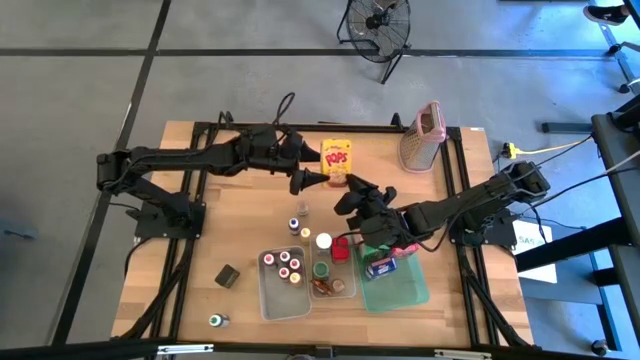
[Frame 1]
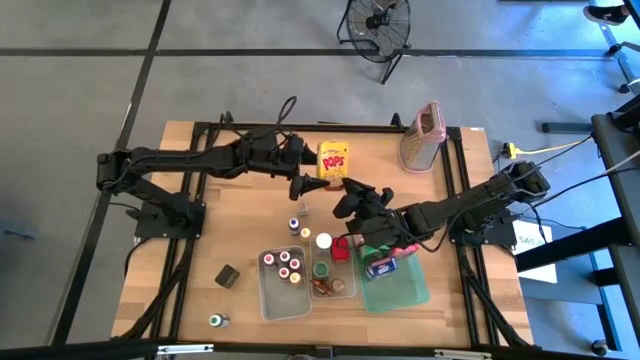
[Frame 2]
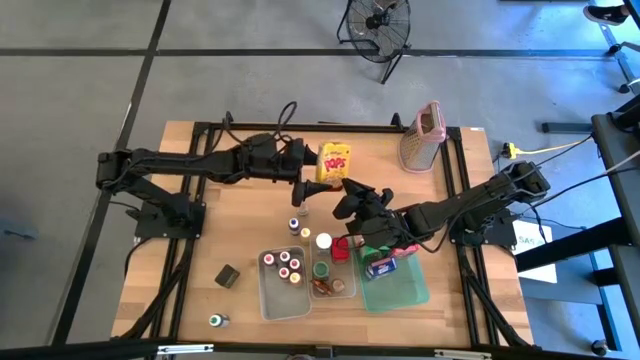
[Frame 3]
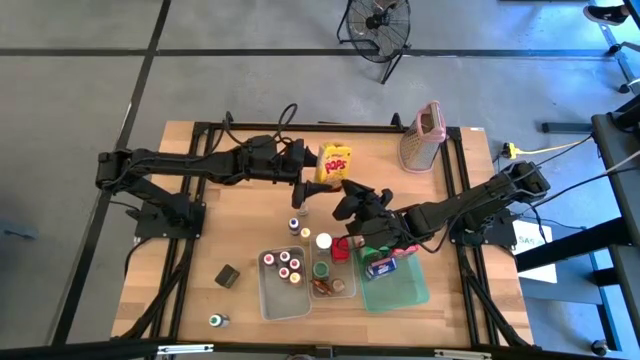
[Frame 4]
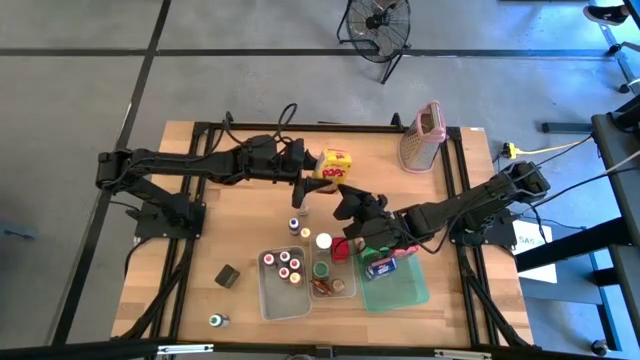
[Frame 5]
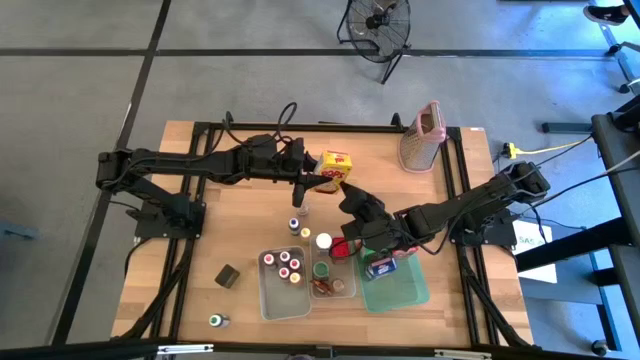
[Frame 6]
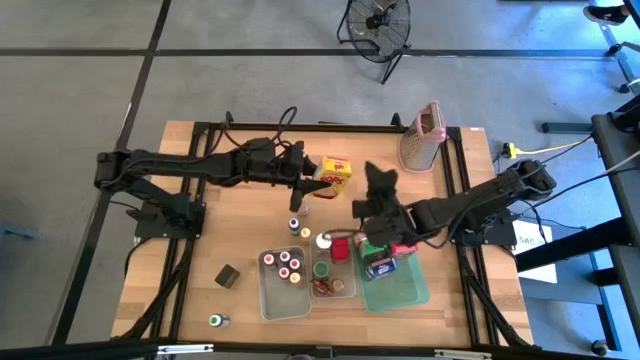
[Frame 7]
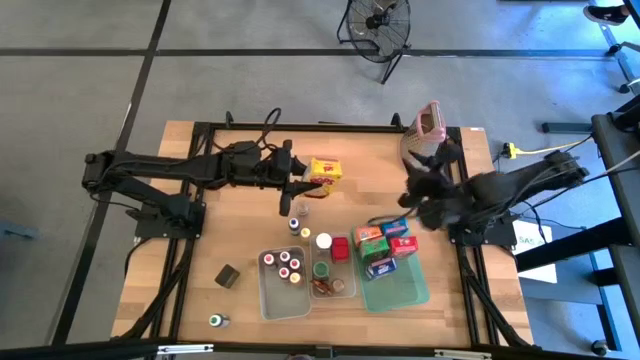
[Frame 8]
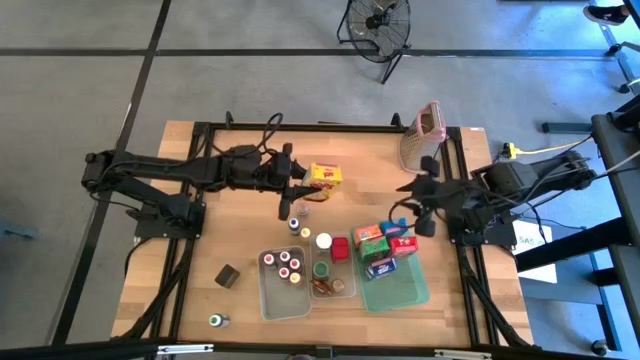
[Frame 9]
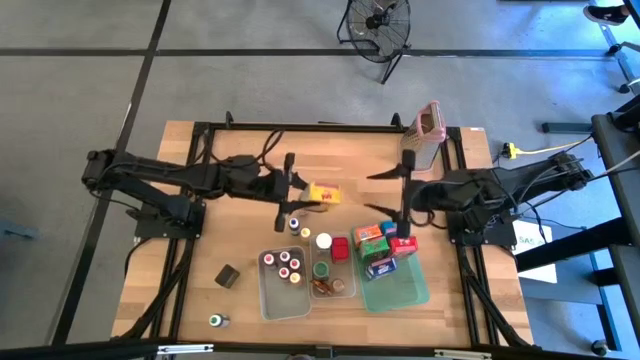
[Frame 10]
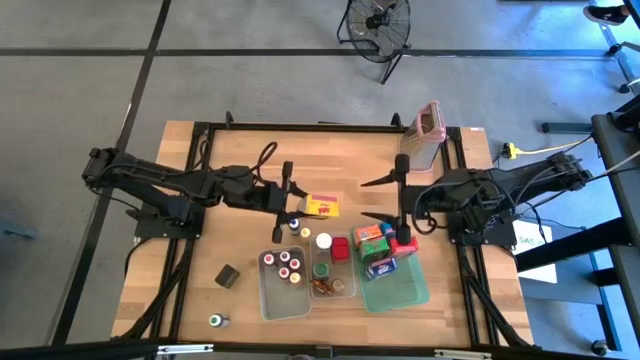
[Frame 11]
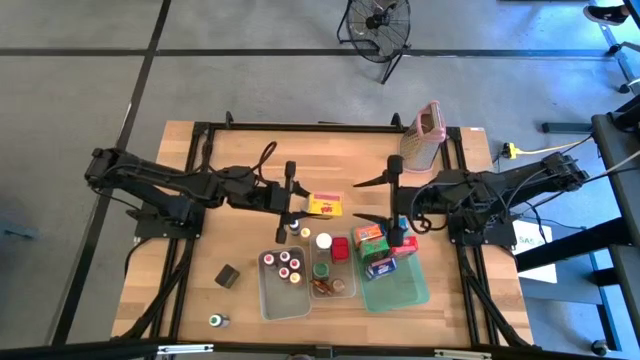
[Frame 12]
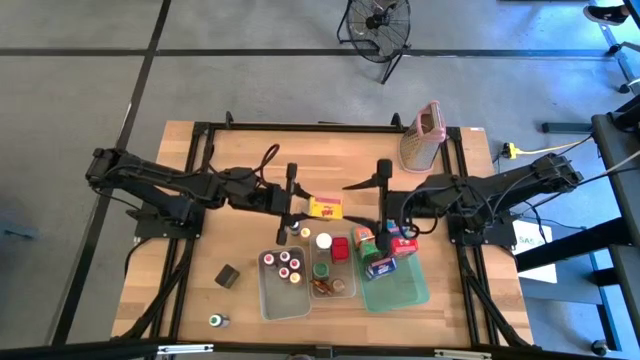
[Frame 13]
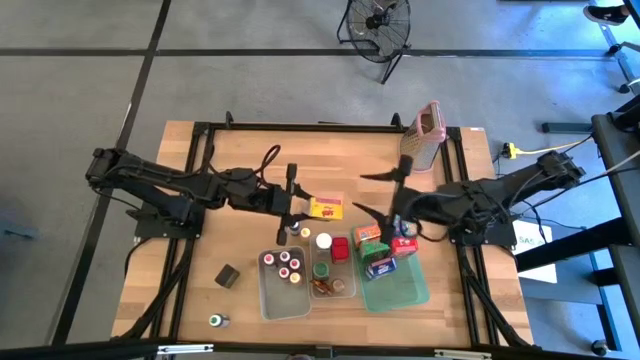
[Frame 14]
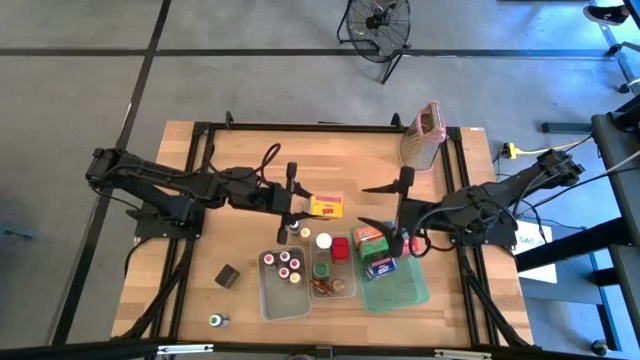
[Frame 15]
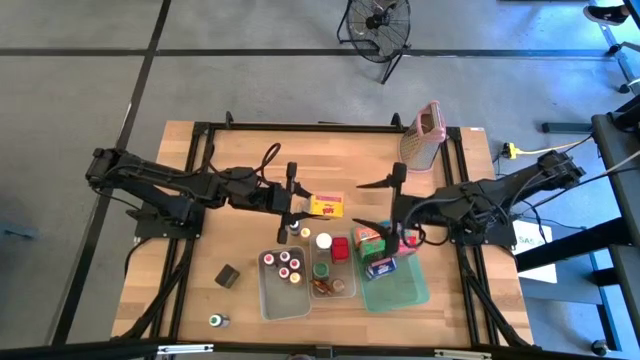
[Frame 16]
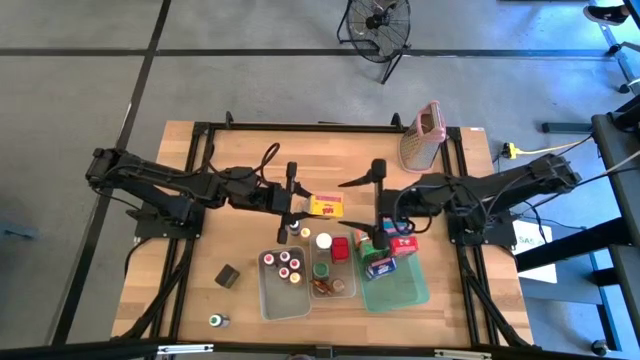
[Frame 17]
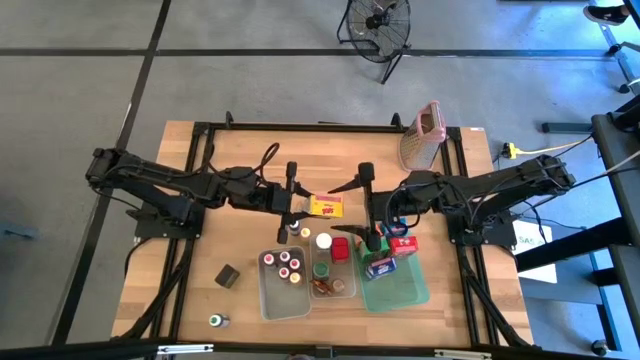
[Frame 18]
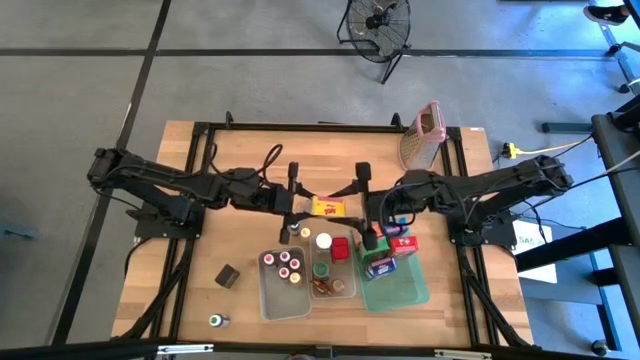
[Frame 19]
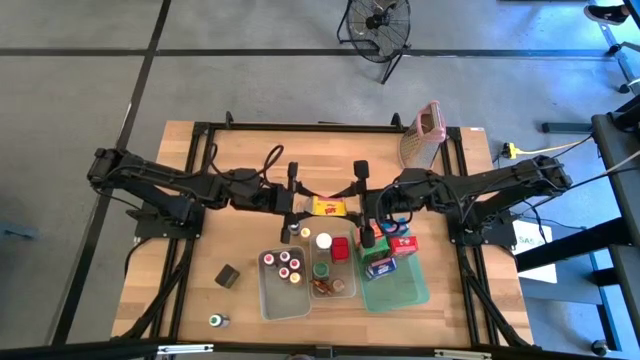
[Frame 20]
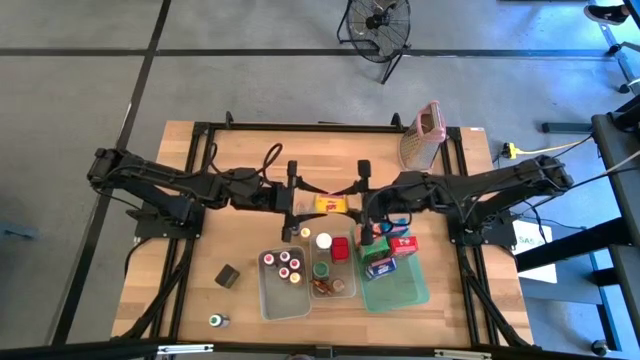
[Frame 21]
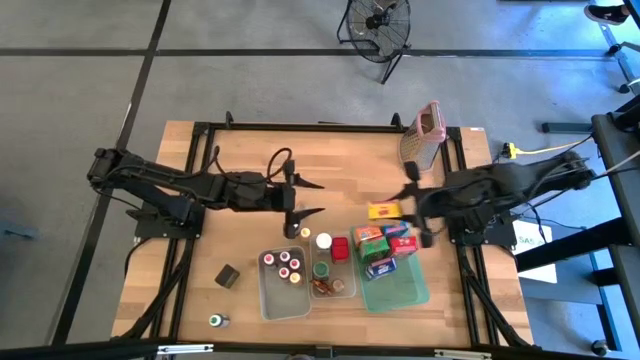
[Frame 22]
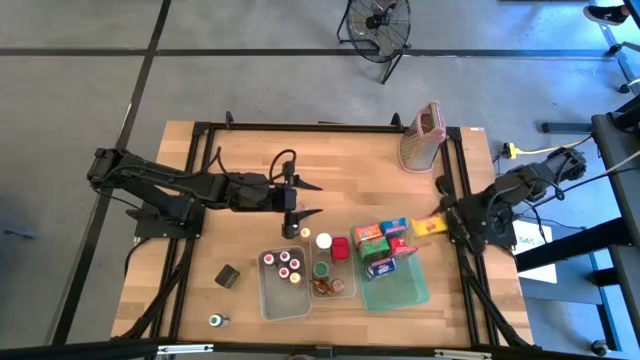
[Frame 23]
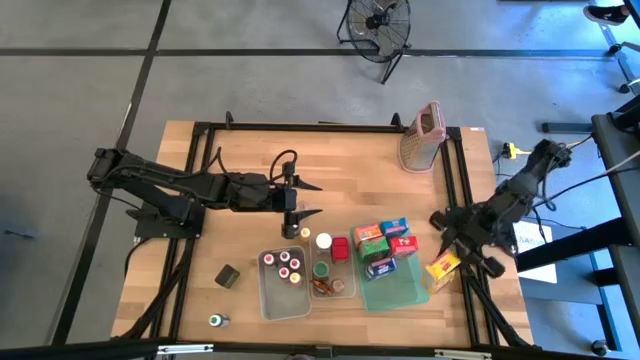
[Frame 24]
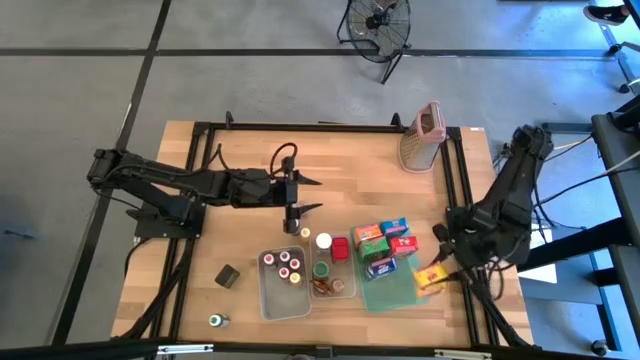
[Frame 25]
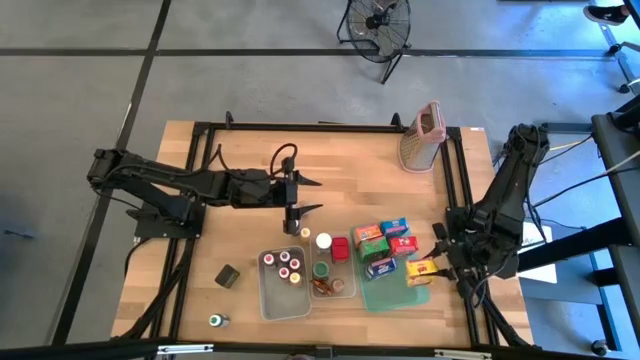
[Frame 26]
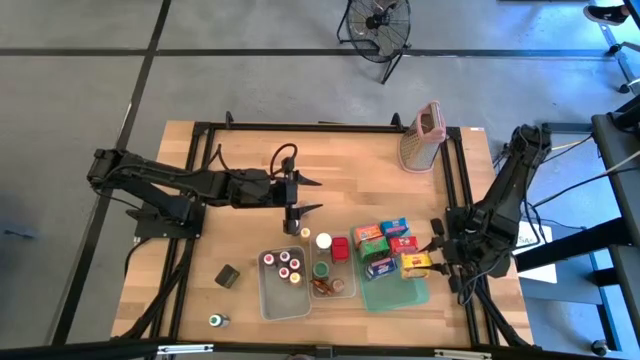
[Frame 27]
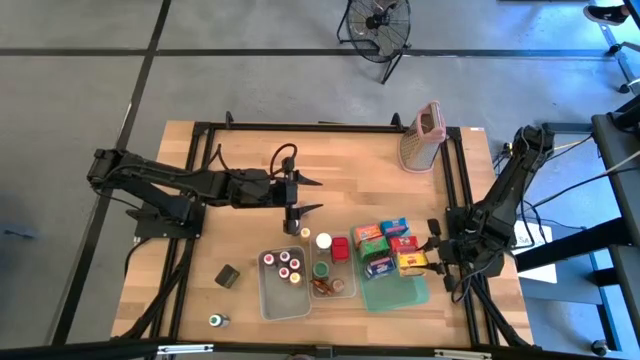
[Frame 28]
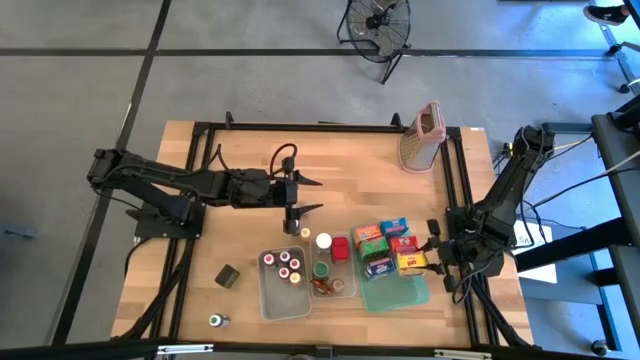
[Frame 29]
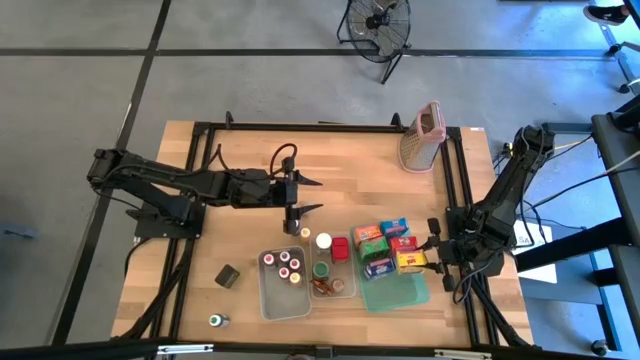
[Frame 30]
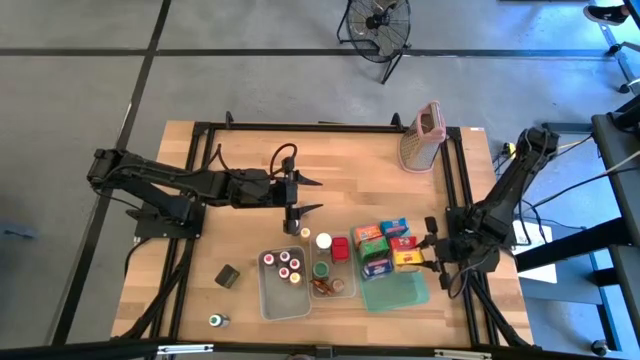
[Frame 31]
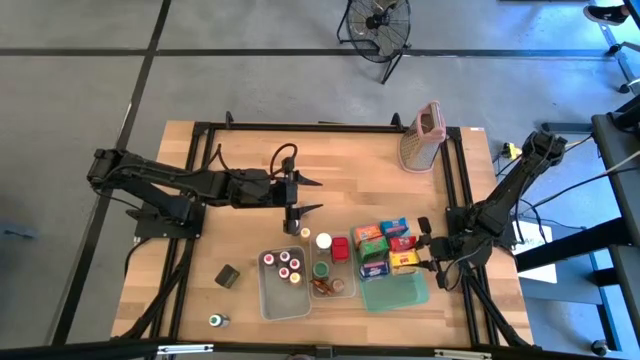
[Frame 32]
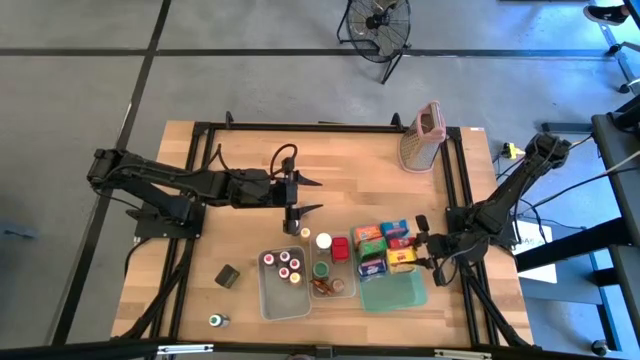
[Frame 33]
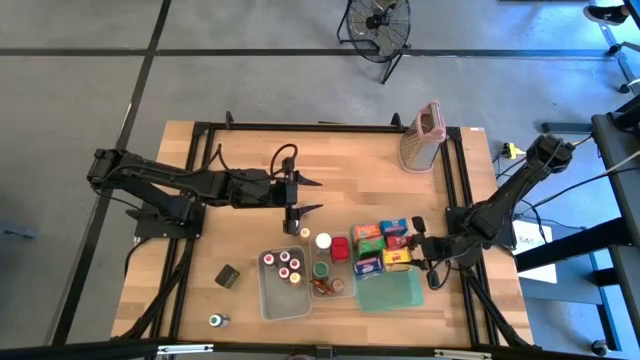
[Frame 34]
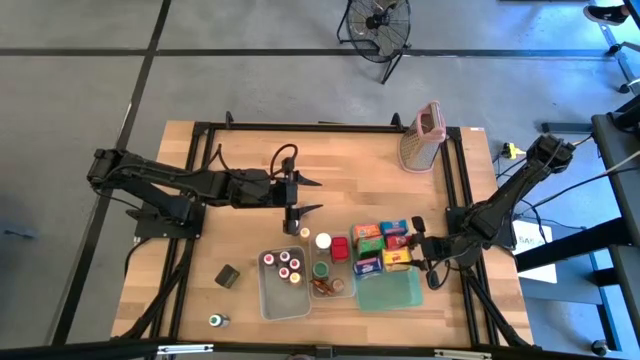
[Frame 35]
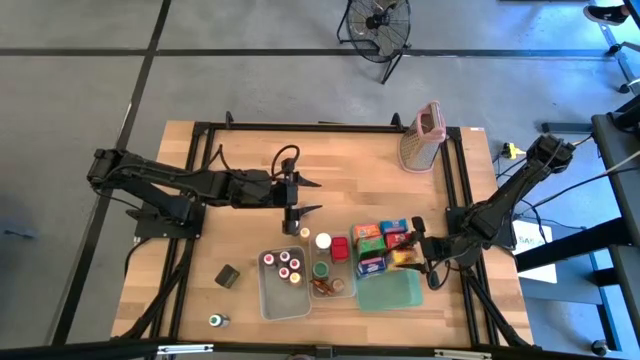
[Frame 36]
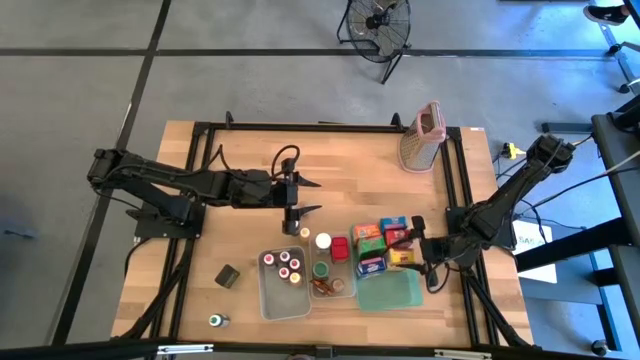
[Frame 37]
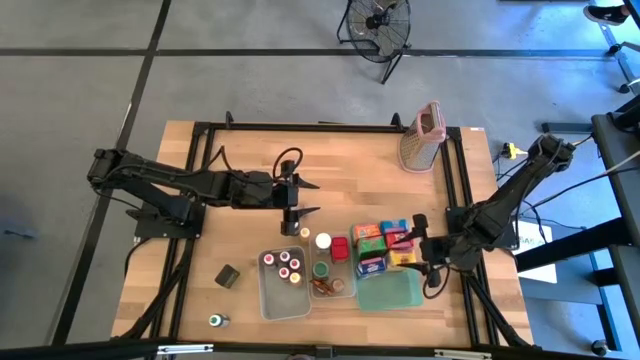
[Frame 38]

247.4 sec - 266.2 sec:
Task: Pick & Place Kitchen Items
Put the yellow cereal box into the blue bin
